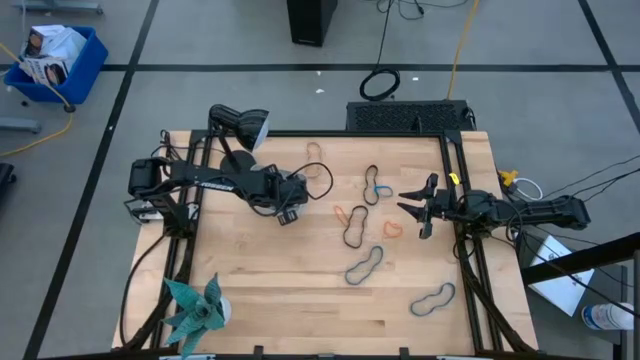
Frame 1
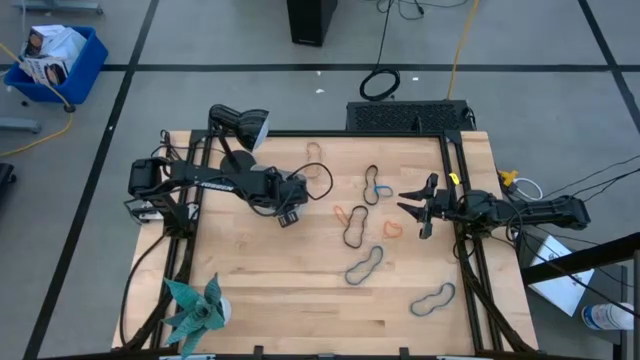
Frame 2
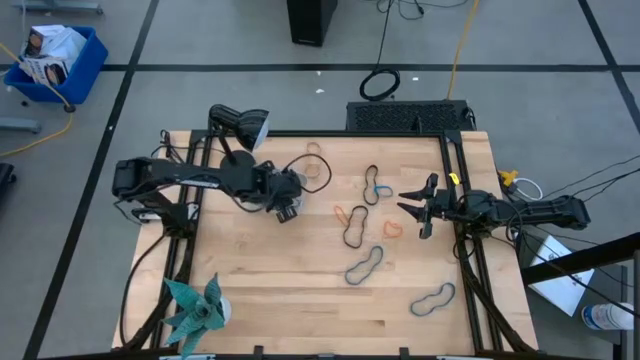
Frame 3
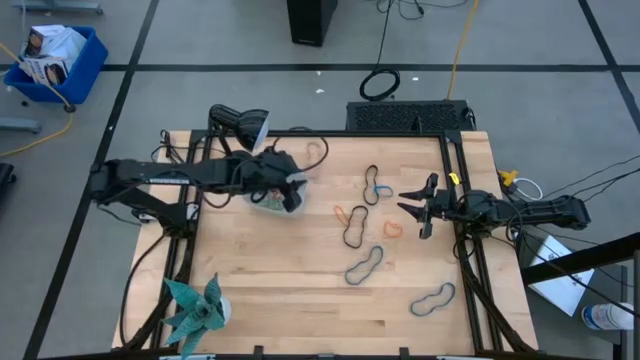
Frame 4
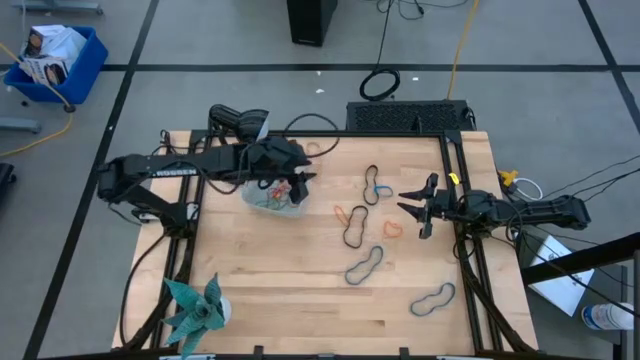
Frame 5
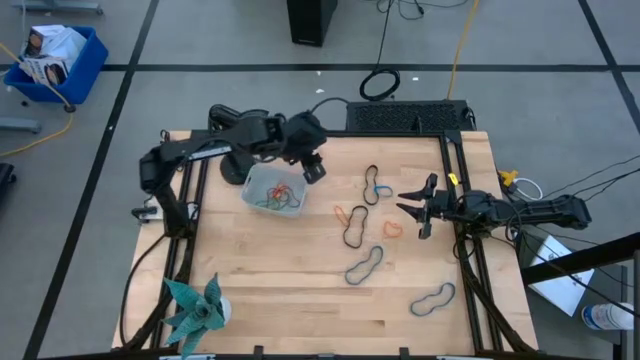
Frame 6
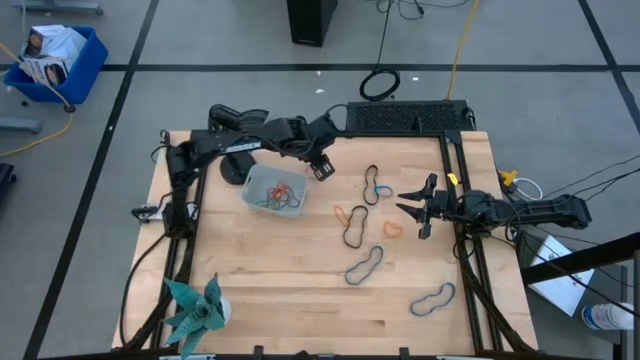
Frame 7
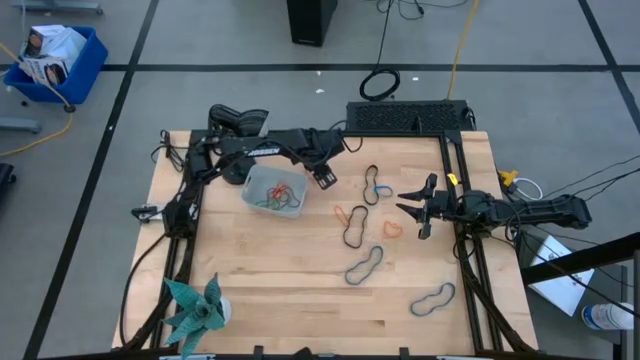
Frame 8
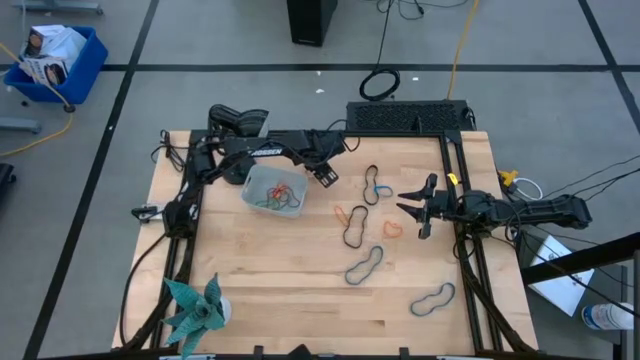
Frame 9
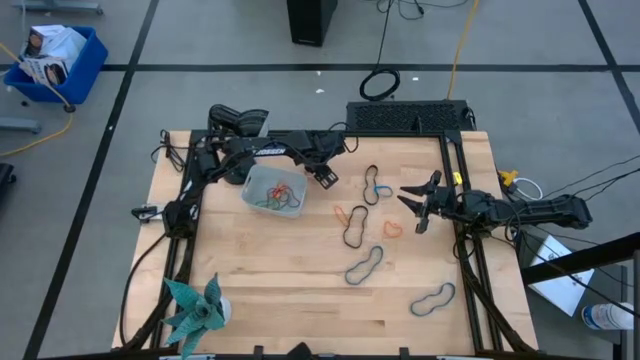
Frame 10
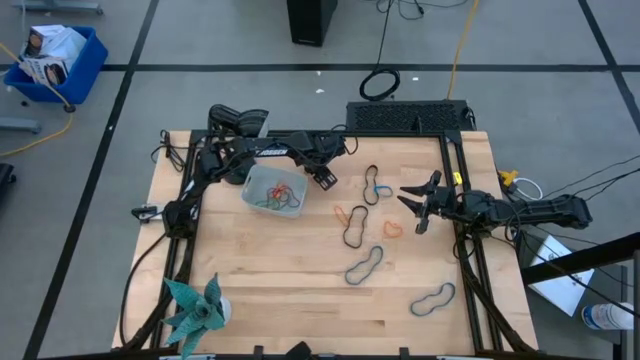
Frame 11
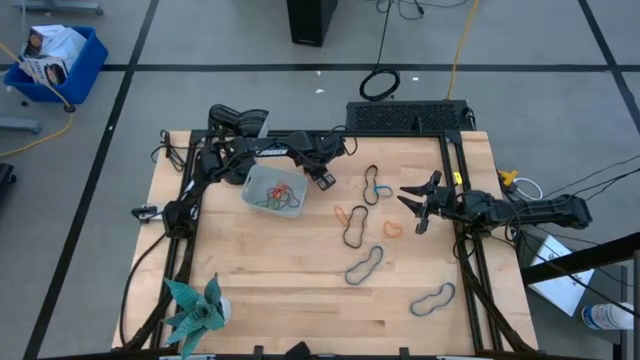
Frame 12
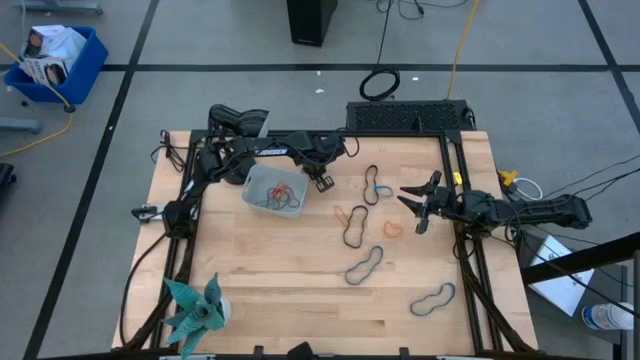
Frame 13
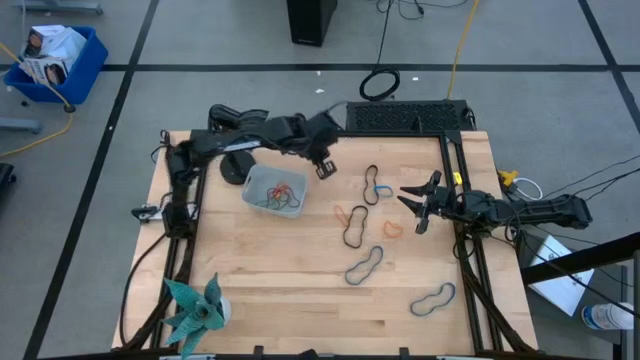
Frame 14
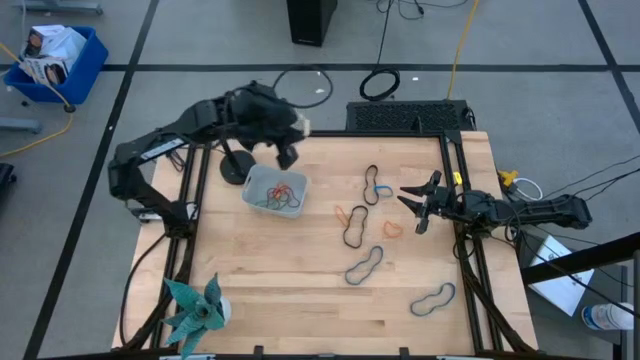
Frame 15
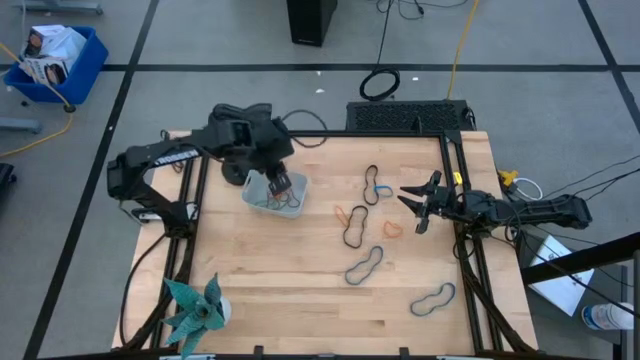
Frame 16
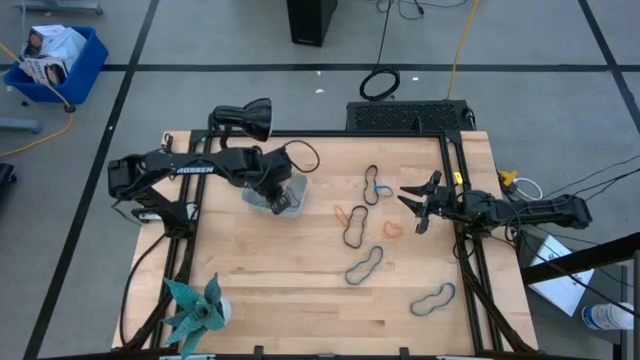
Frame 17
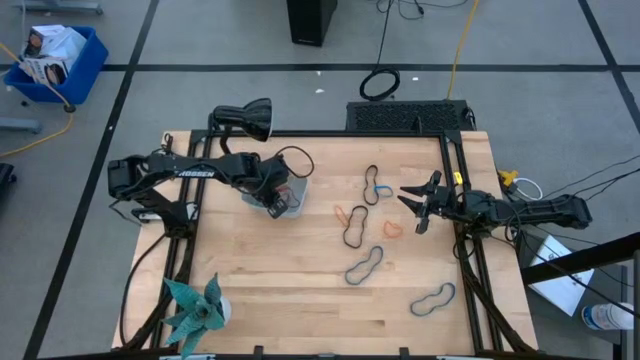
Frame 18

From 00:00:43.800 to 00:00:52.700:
Task: Pick and place rubber bands into bin
Put the white rubber band into the gray bin

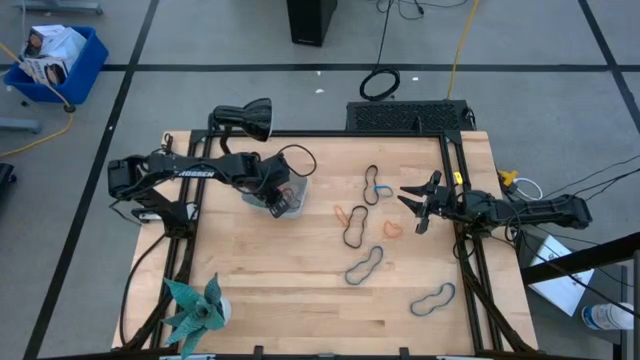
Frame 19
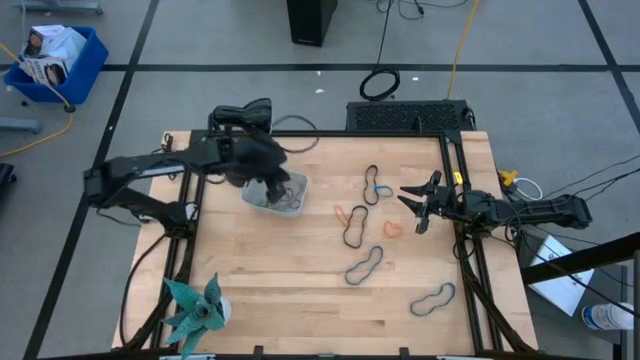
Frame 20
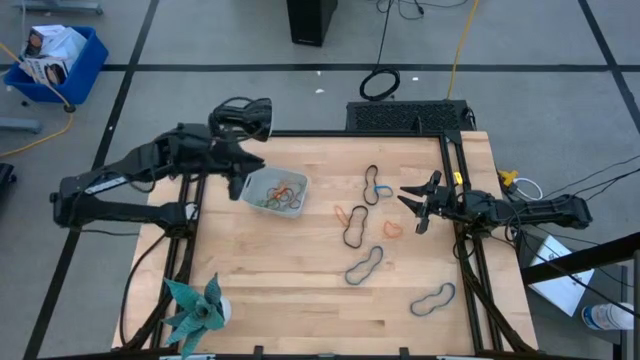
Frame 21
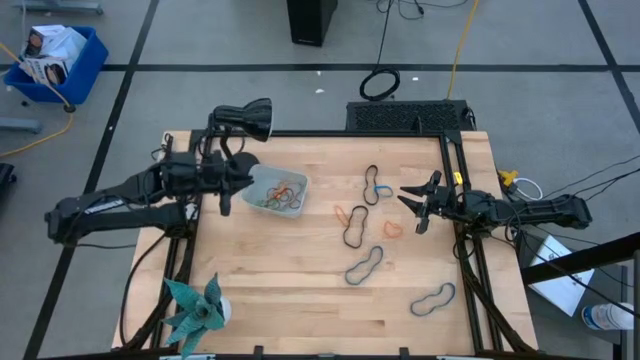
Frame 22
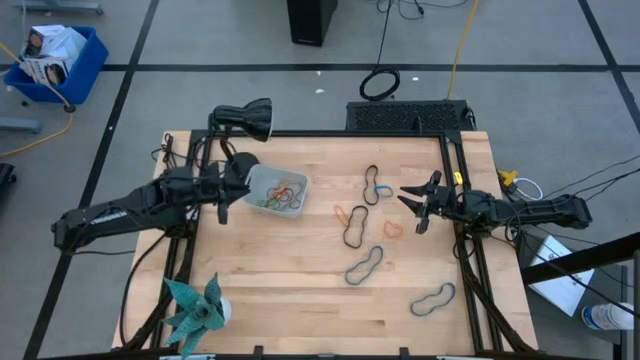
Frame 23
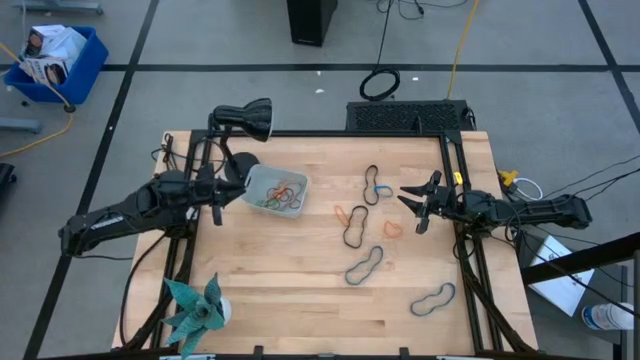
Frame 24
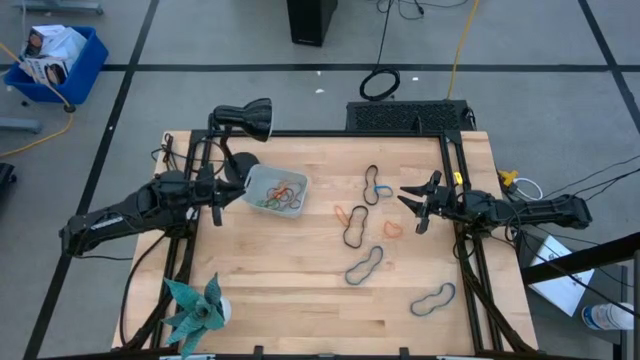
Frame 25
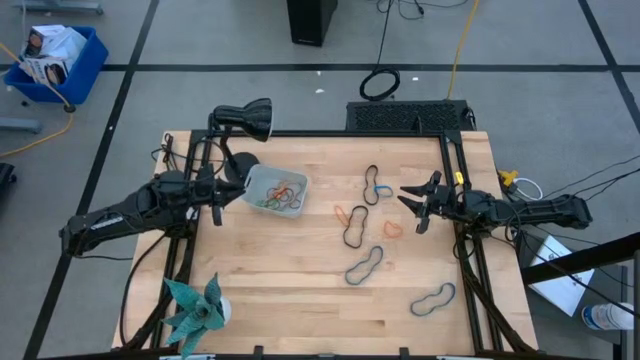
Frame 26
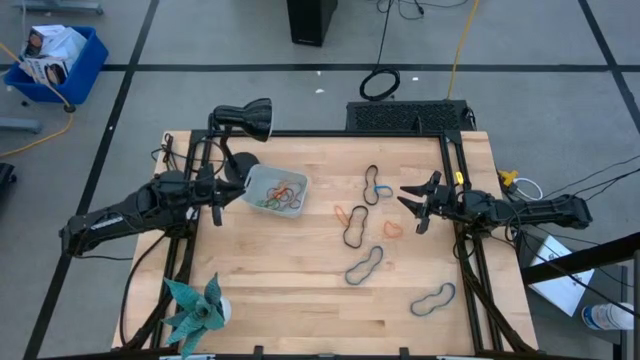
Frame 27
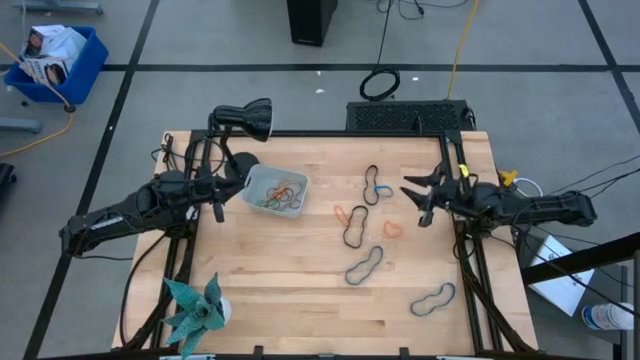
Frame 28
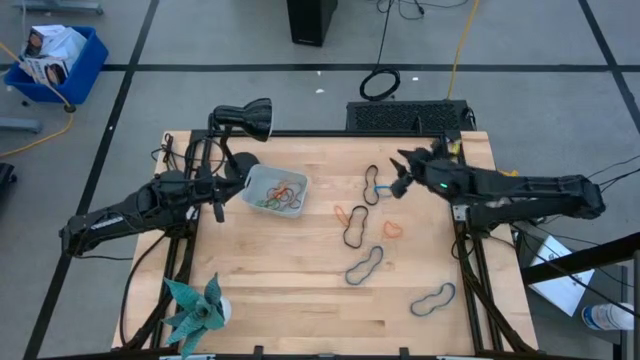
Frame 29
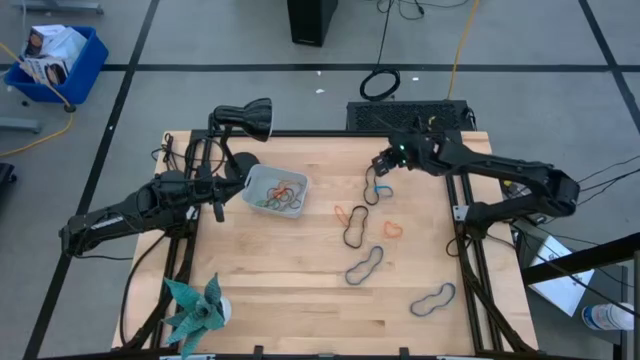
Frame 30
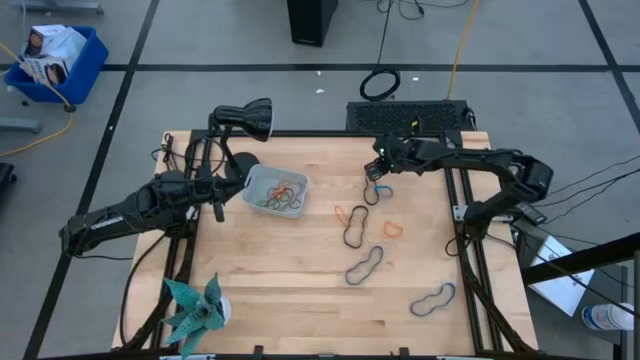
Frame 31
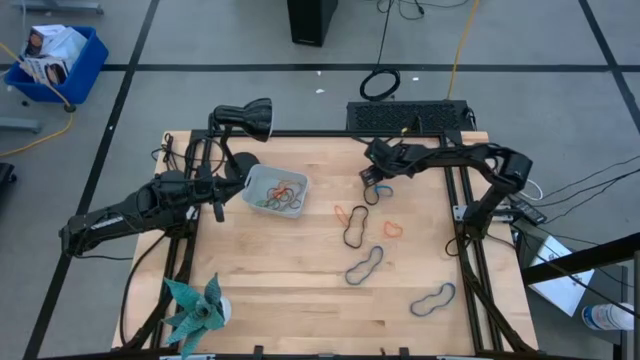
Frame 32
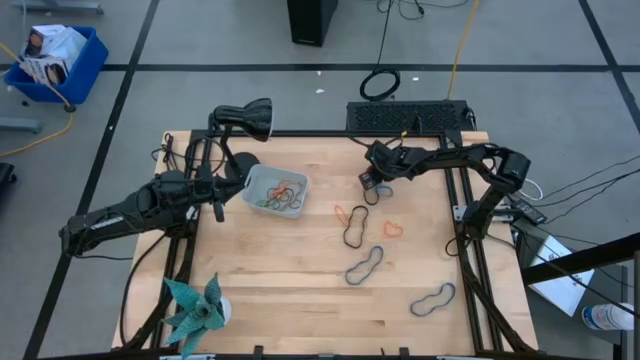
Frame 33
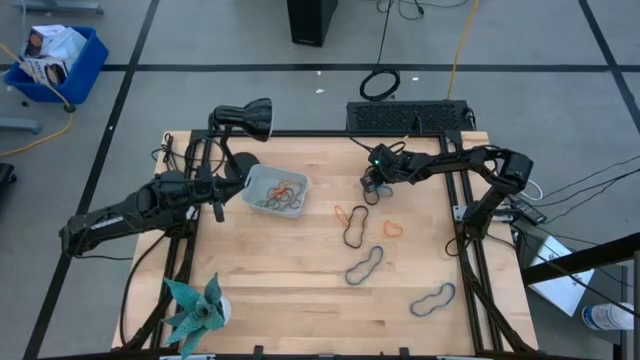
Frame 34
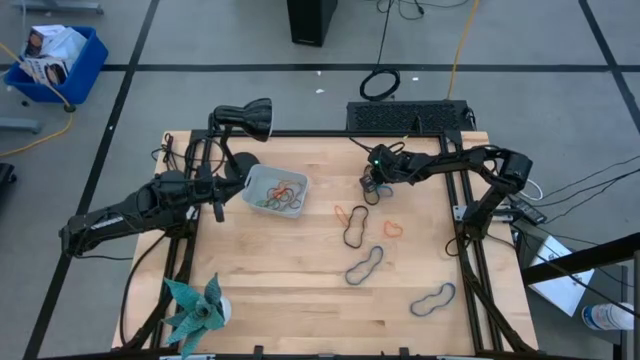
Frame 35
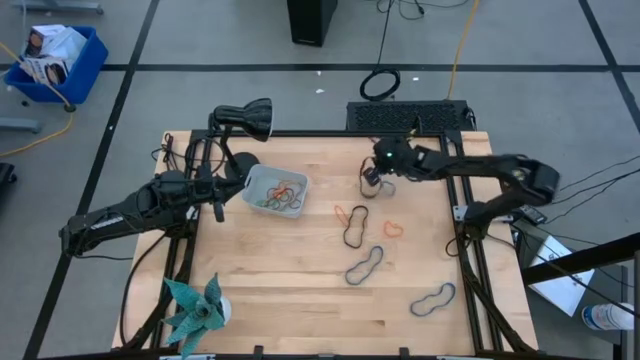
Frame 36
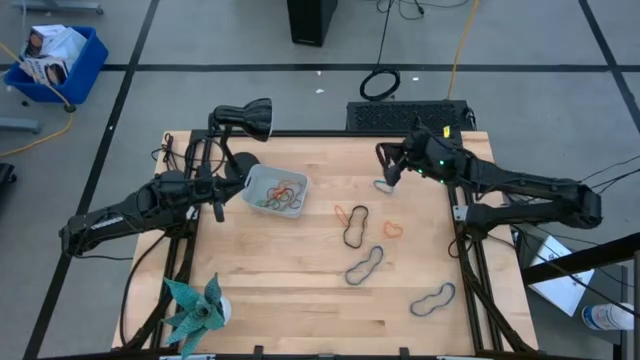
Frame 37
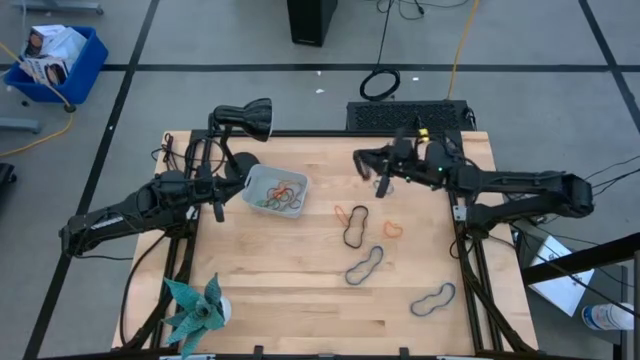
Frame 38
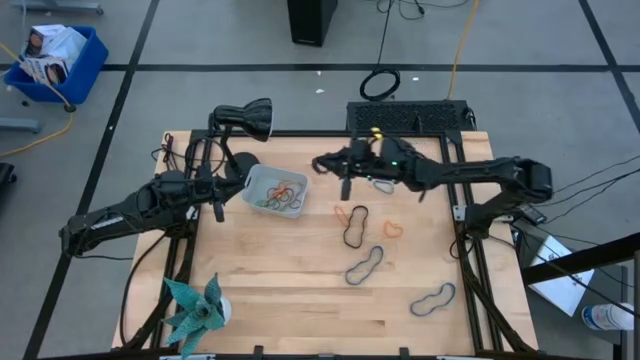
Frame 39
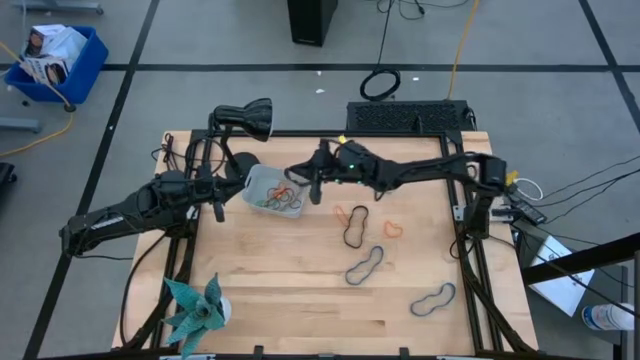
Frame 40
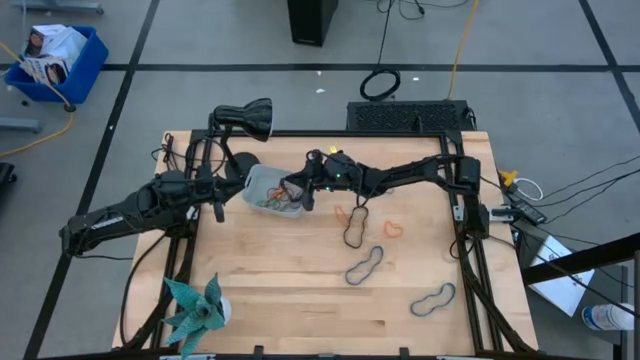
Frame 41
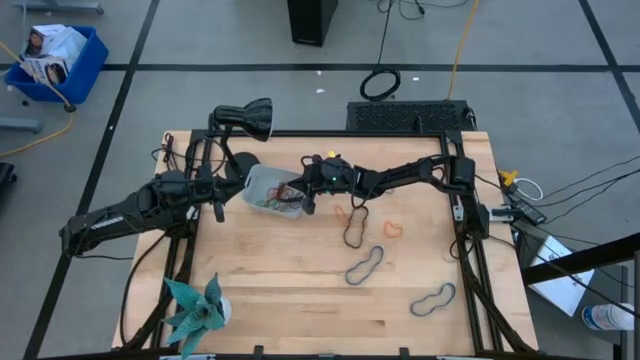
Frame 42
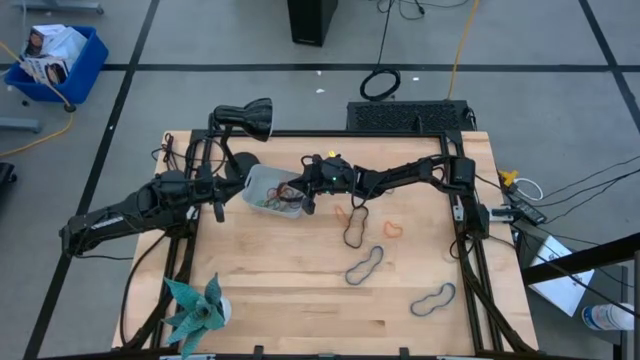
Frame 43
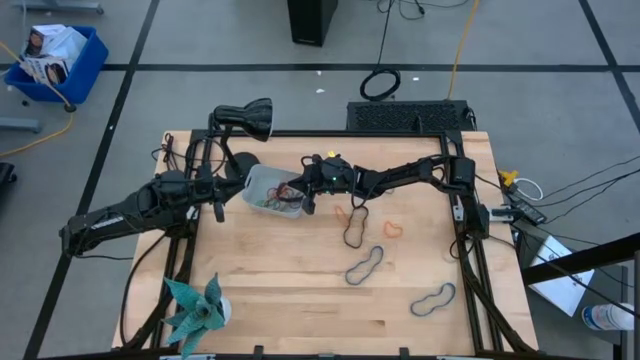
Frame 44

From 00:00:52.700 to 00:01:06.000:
Put the top black rubber band into the gray bin
